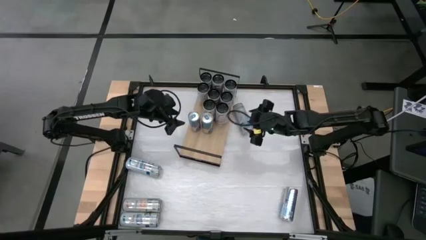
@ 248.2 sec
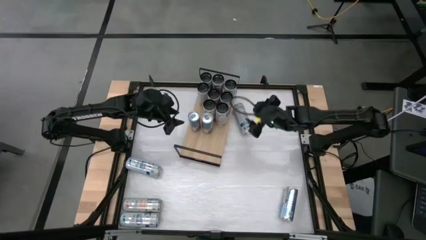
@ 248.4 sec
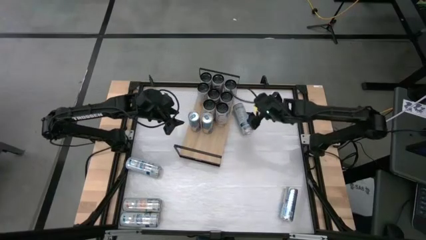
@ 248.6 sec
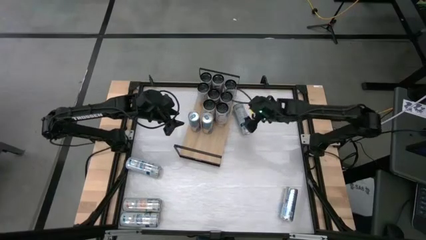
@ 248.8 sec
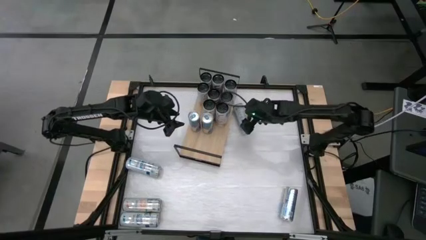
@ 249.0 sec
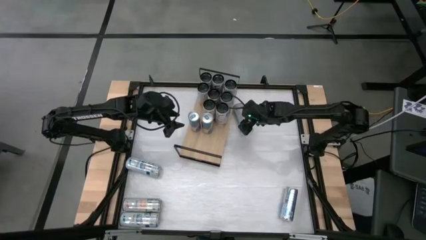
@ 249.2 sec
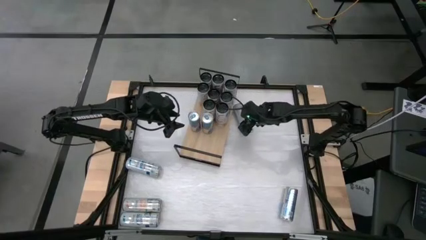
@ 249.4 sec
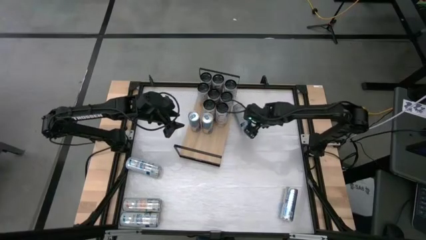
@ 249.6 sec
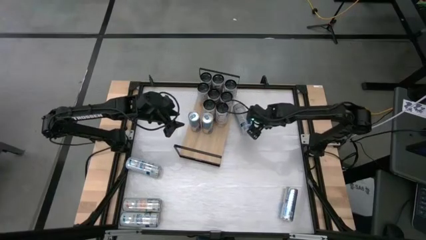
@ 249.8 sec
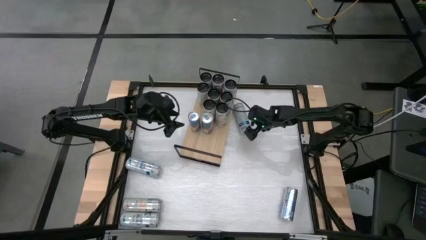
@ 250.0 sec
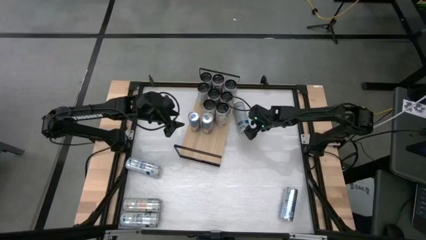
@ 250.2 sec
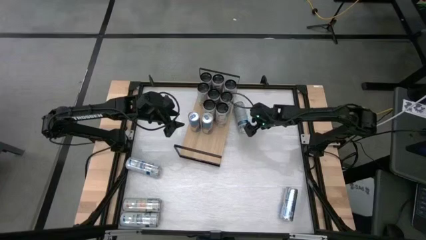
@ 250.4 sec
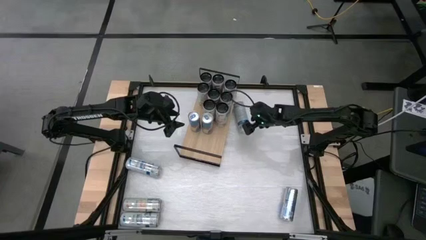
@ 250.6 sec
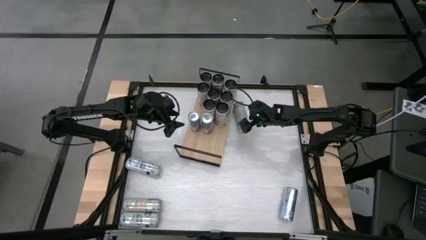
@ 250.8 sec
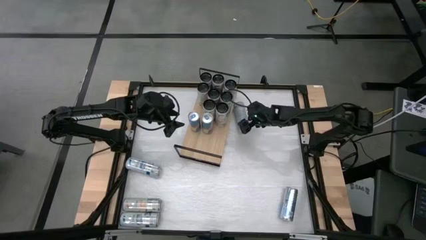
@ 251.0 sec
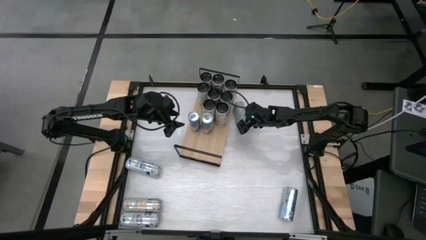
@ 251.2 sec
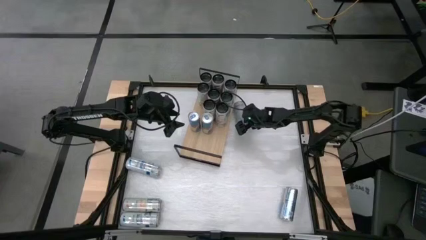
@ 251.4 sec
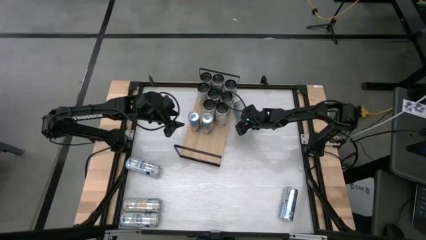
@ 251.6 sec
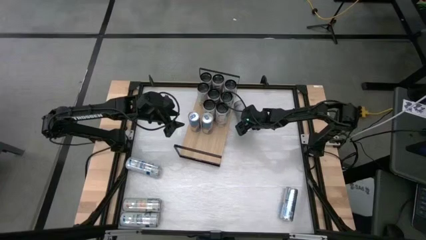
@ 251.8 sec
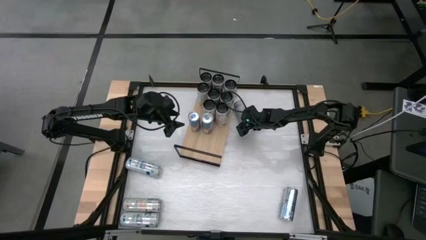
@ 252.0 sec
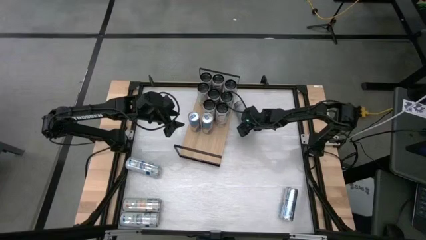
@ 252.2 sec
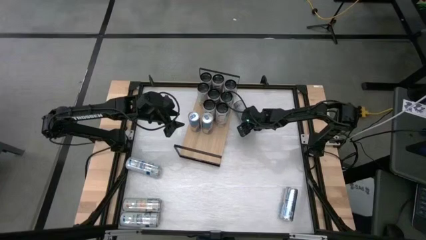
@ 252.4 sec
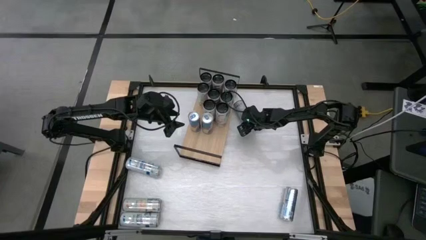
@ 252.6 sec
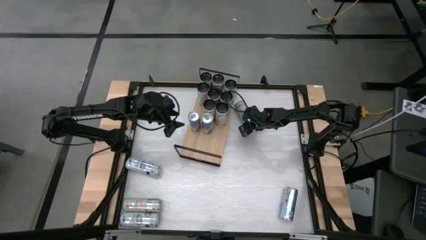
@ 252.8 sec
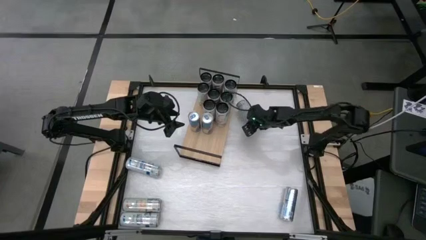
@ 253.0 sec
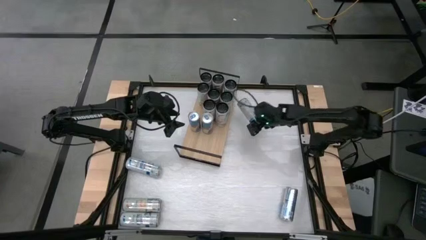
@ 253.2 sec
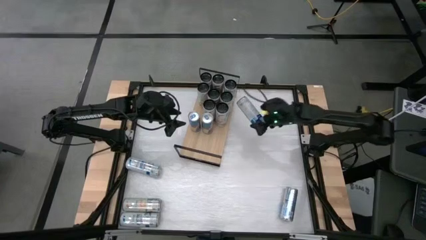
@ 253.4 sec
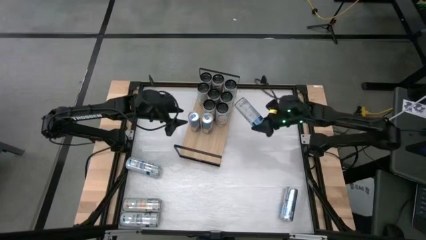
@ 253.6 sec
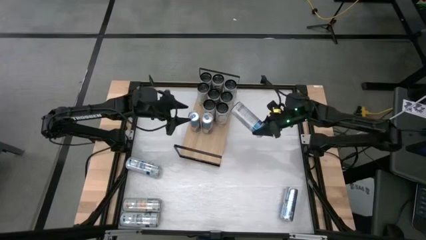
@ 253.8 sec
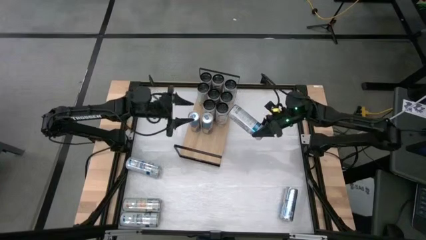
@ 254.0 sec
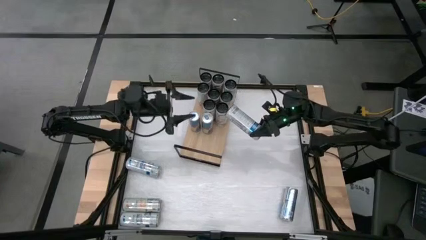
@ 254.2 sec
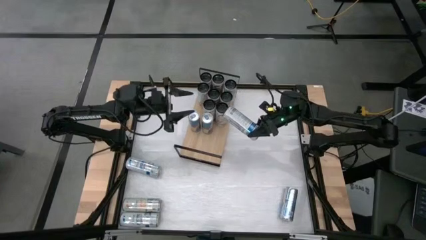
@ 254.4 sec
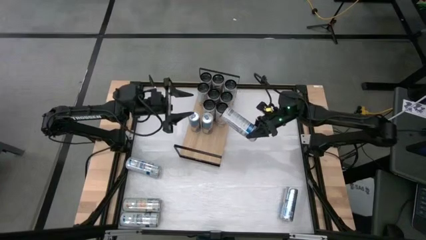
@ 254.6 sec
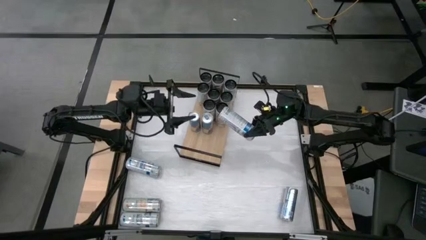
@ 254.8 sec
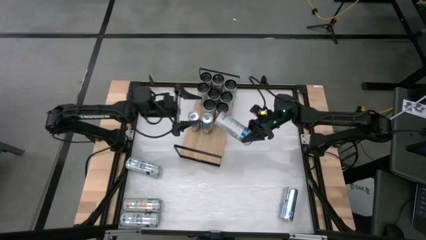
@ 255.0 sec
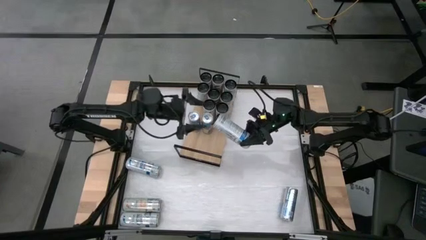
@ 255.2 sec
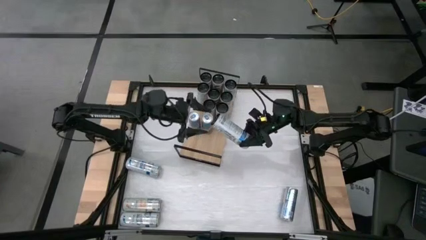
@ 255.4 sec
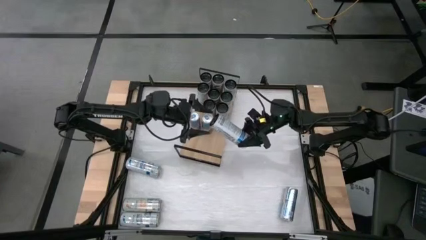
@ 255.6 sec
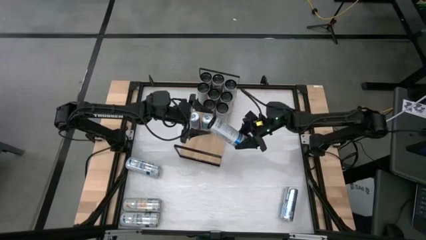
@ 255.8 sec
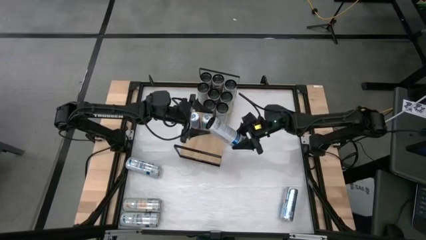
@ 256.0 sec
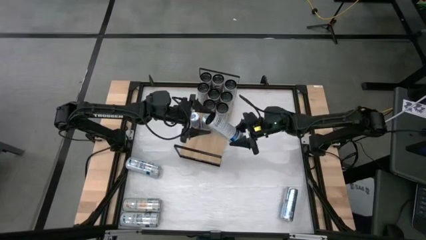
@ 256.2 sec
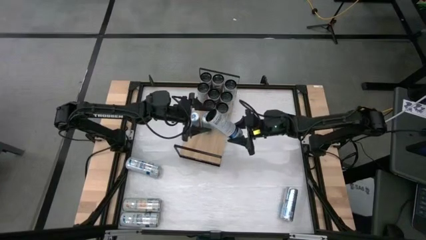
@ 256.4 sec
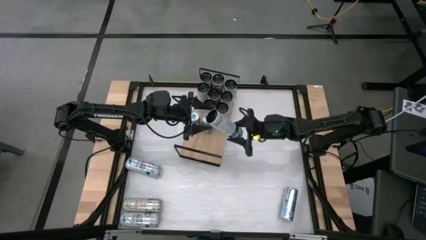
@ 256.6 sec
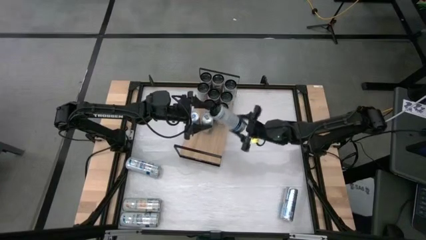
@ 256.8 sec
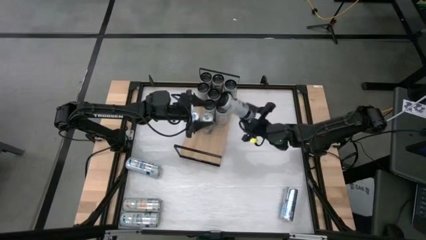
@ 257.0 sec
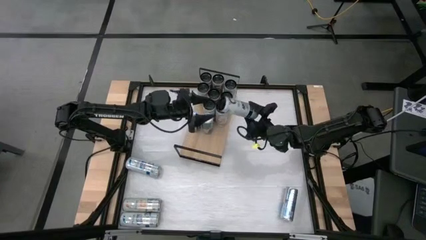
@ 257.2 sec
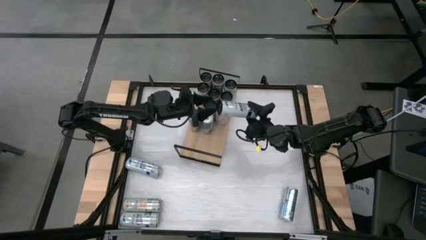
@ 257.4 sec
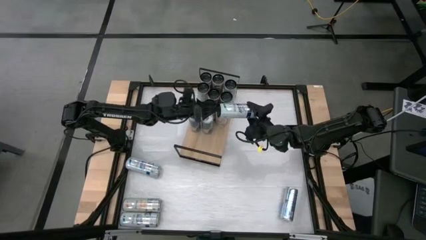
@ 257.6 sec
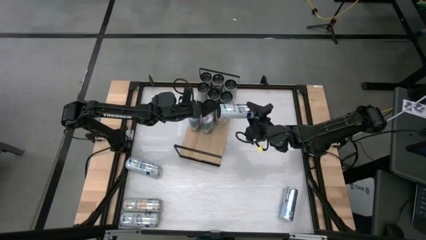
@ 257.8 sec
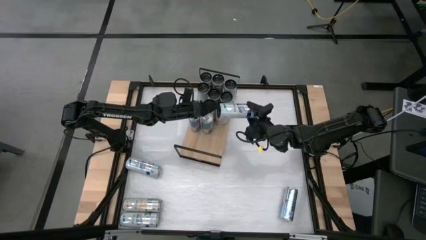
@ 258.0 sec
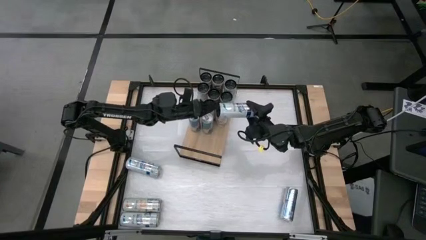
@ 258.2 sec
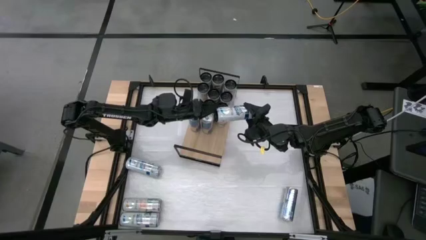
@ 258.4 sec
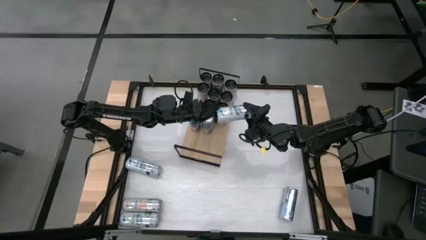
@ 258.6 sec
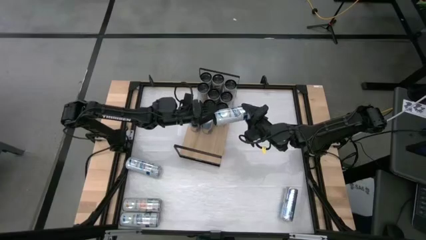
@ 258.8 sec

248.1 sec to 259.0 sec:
Task: Place canned beverage on shelf
Put the top right blue soda can on the shelf

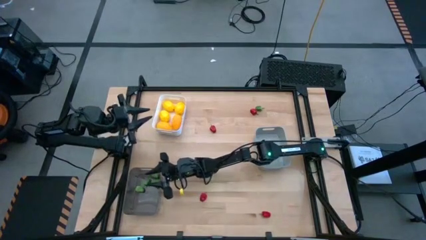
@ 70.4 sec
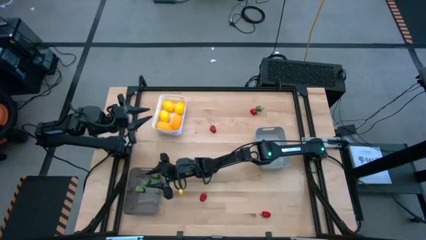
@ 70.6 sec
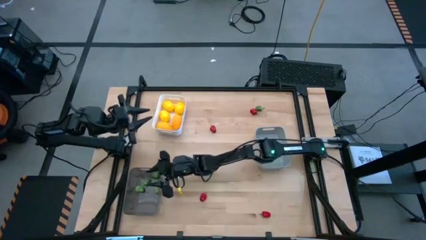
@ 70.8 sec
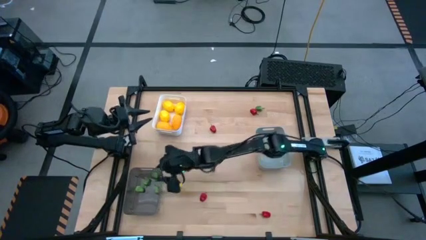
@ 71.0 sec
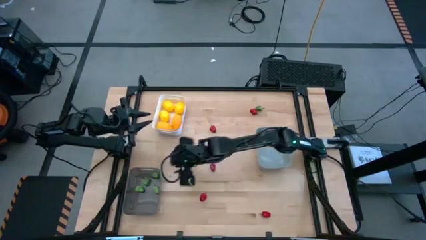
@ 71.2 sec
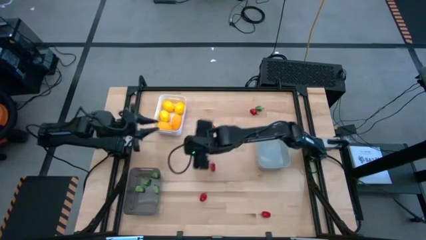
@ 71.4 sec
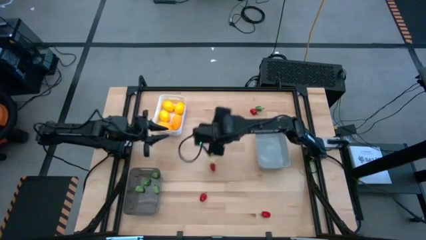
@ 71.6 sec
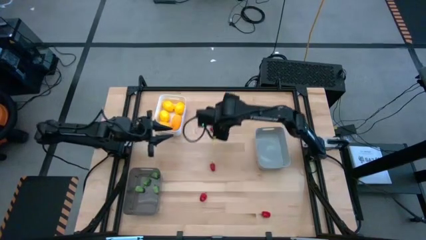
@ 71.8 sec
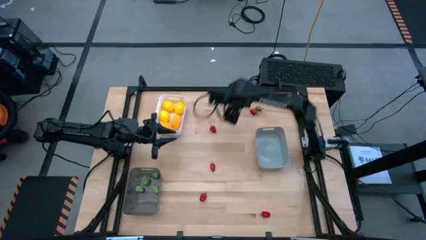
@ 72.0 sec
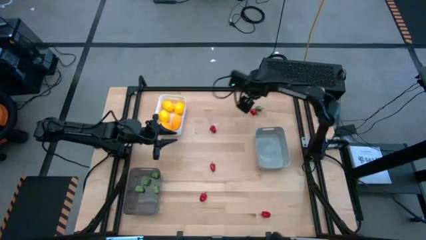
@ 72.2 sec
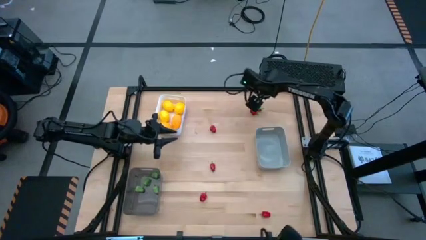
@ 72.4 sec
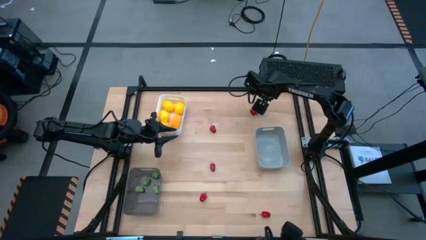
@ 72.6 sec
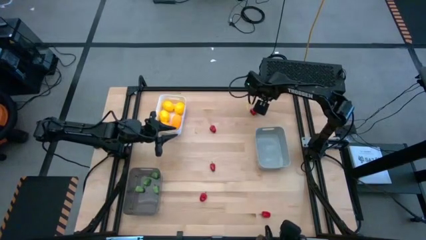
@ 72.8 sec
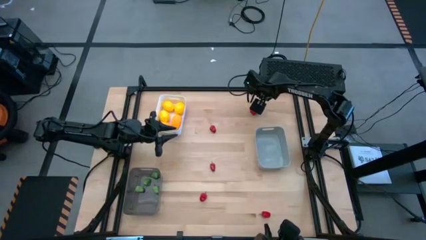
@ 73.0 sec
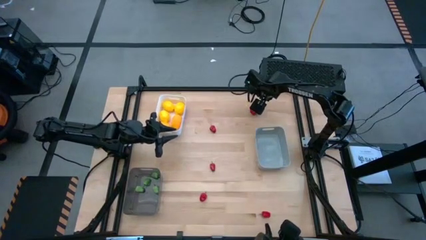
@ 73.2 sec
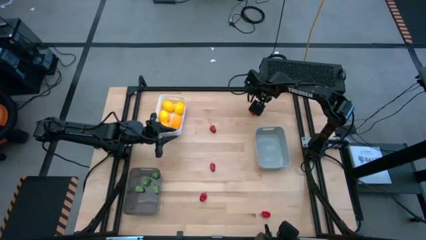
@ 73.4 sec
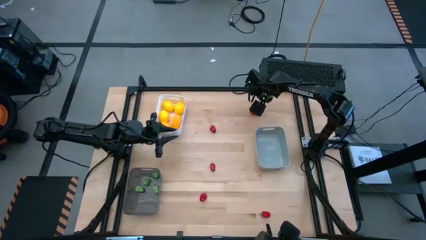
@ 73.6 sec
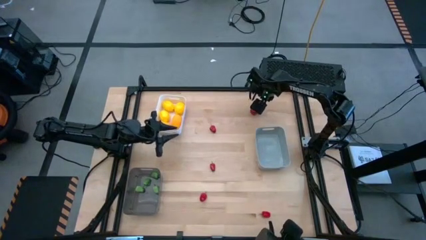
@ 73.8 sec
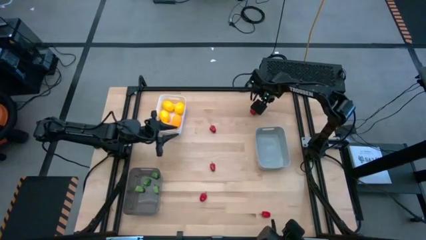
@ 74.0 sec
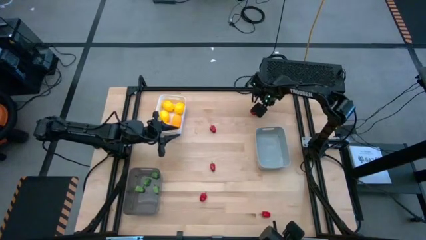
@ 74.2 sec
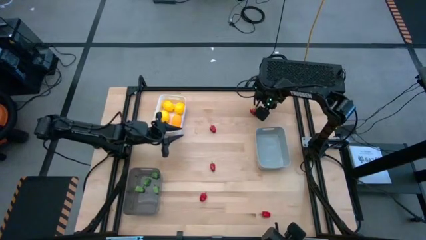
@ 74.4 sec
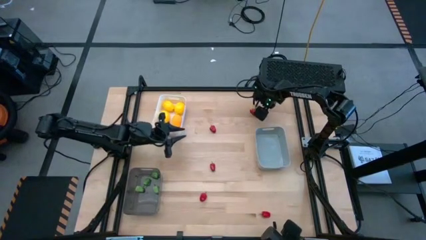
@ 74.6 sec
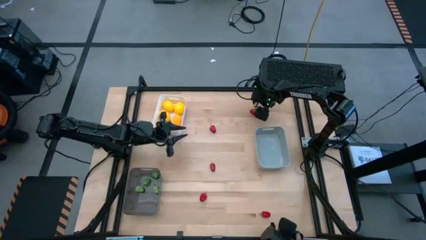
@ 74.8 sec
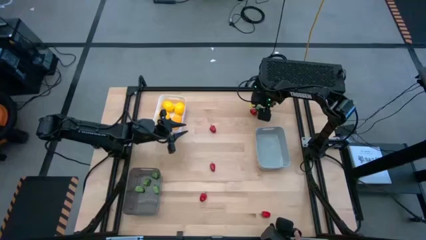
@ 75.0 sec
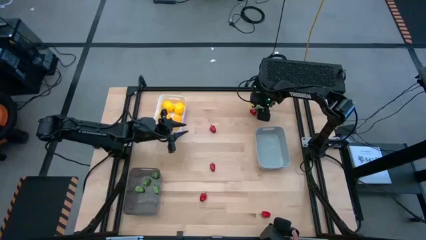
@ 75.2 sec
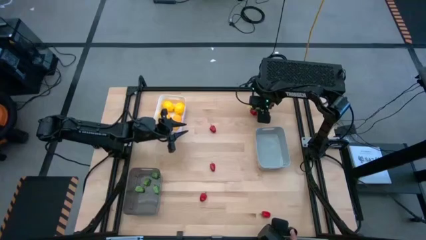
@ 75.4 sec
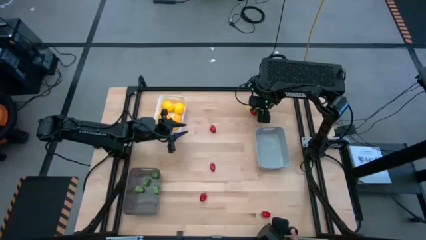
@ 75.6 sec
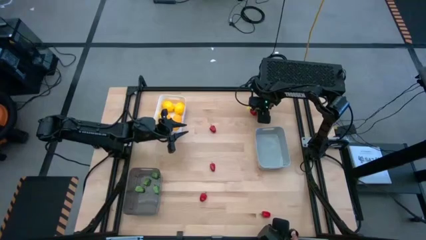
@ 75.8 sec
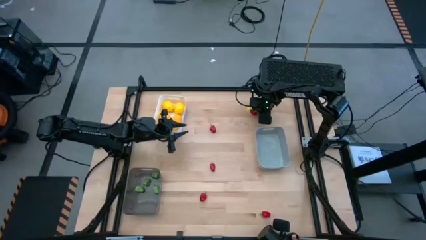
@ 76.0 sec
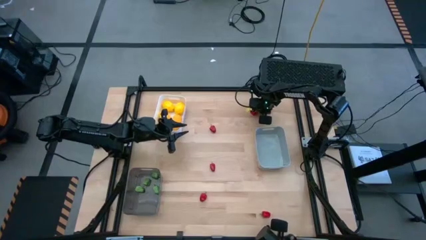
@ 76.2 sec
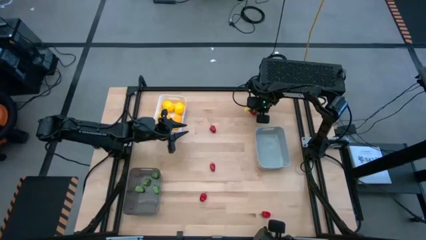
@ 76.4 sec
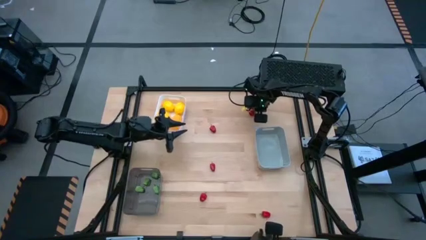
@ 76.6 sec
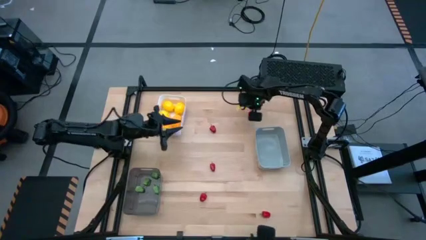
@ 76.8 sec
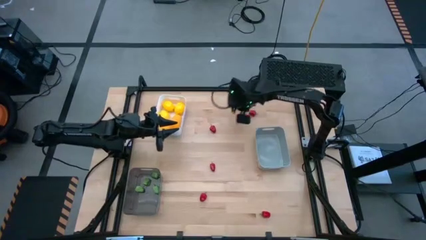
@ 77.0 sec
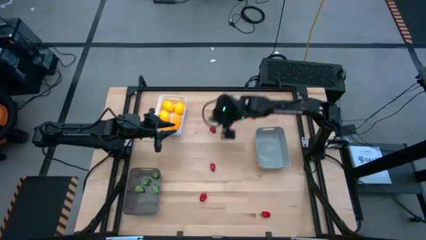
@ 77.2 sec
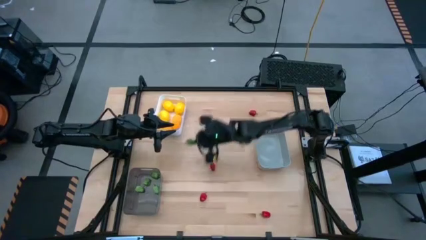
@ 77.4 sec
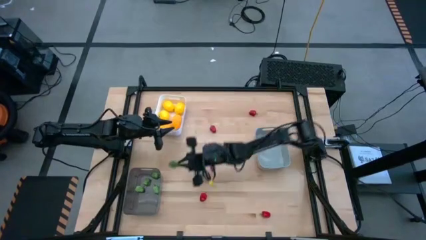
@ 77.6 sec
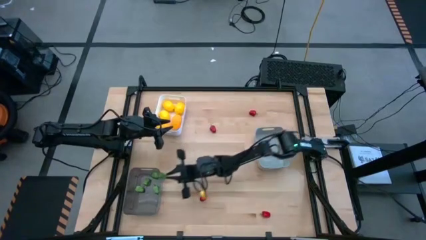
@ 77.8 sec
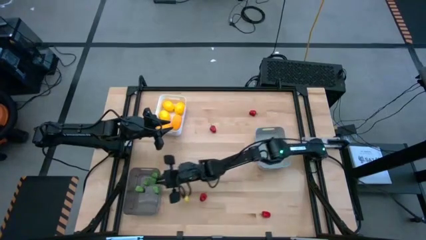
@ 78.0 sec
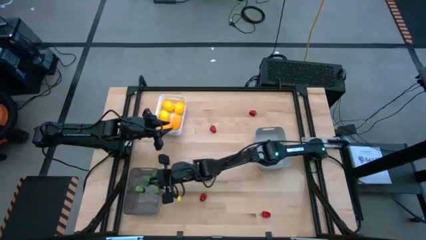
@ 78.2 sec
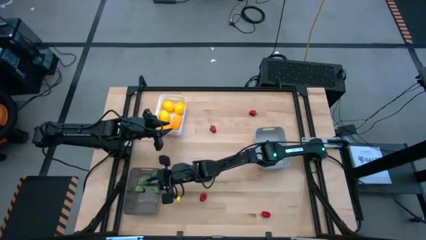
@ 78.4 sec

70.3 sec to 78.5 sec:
Task: Sort produce into baskets
Put the green chili pepper into the transparent black bin
